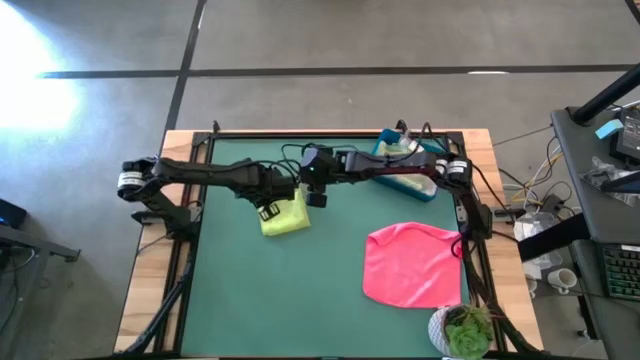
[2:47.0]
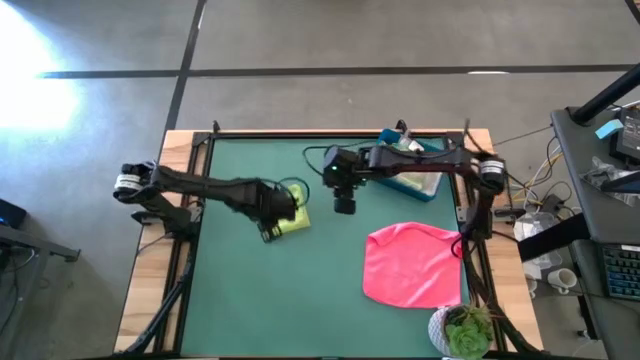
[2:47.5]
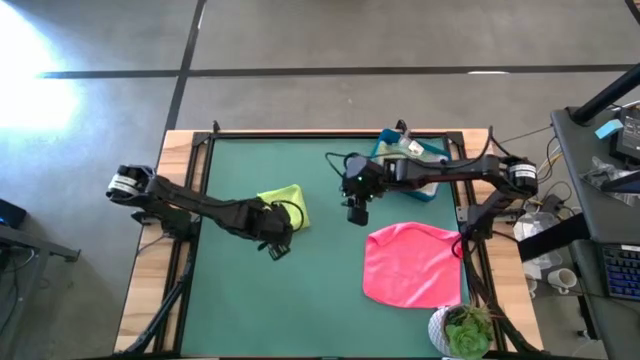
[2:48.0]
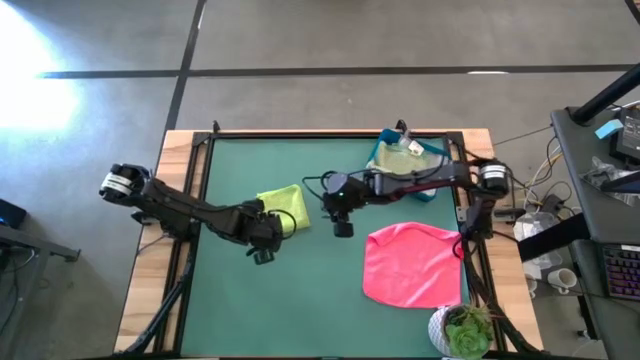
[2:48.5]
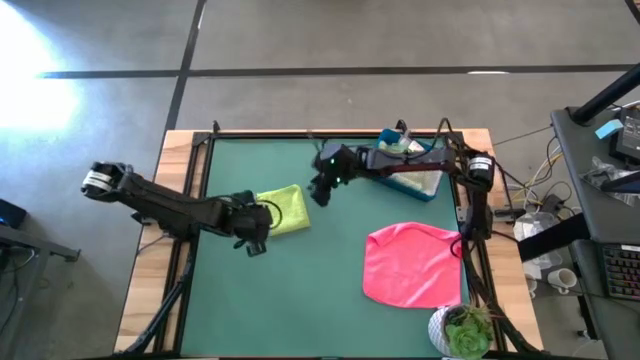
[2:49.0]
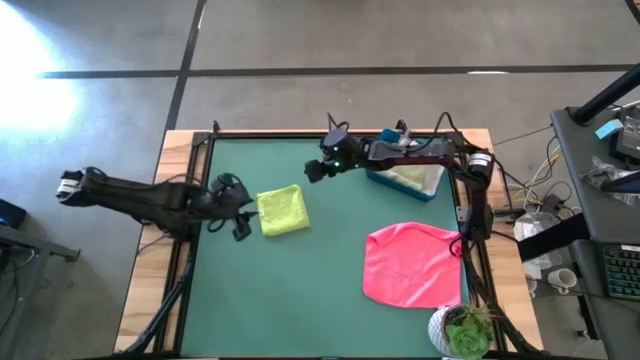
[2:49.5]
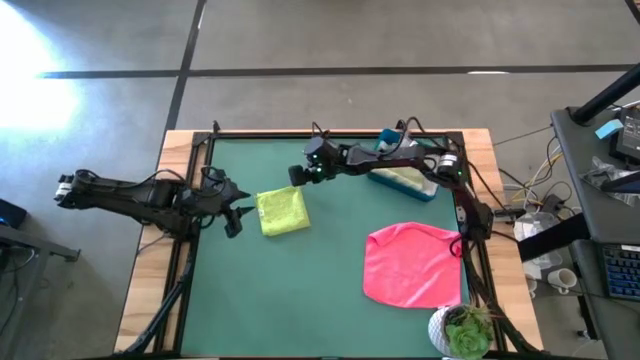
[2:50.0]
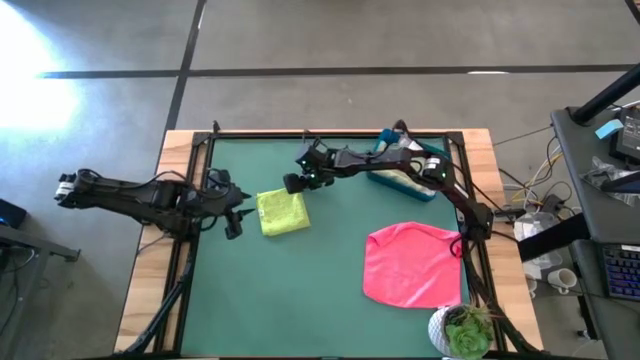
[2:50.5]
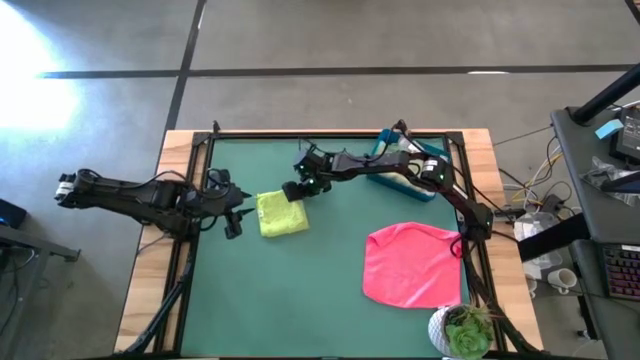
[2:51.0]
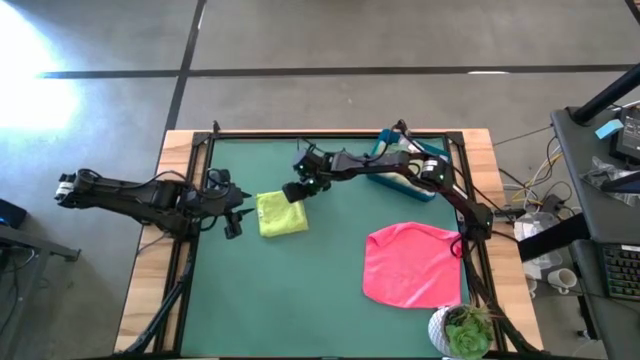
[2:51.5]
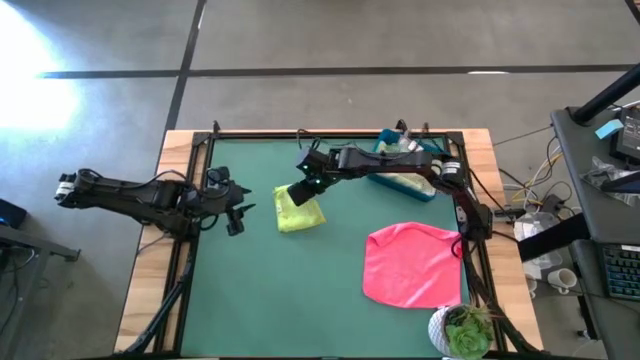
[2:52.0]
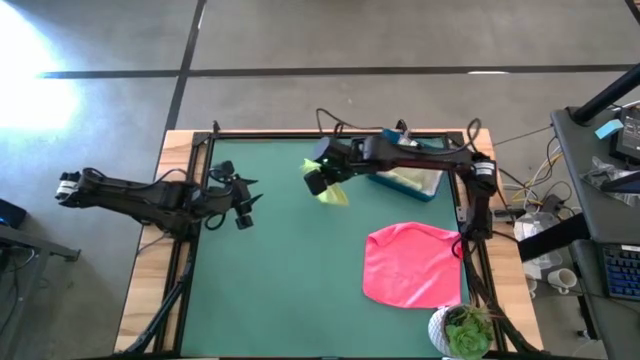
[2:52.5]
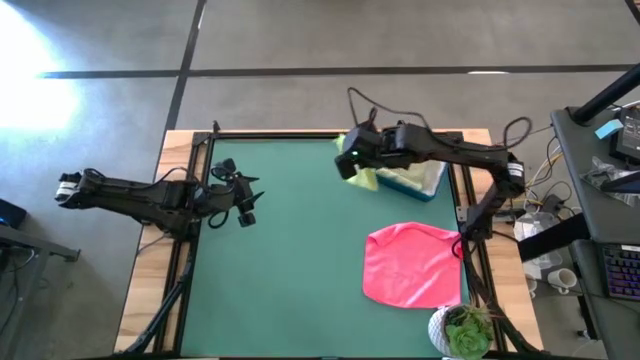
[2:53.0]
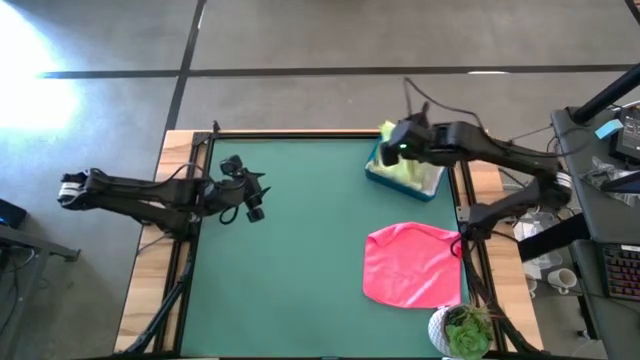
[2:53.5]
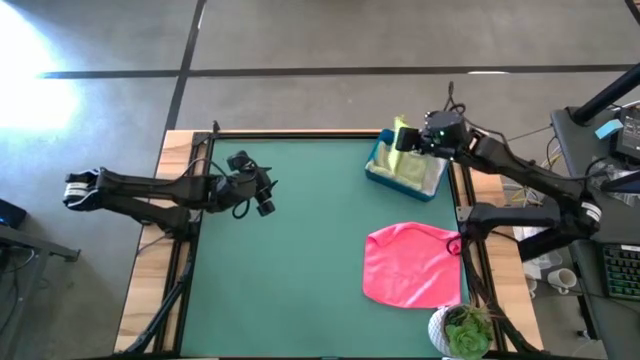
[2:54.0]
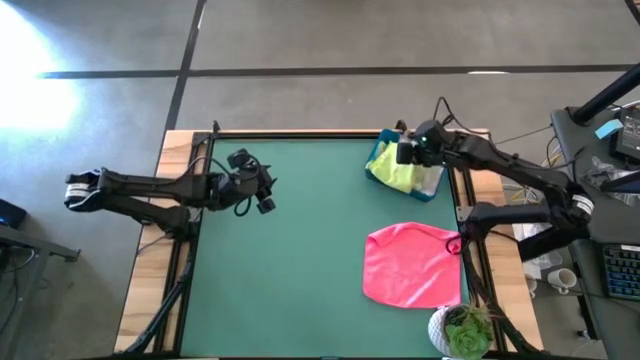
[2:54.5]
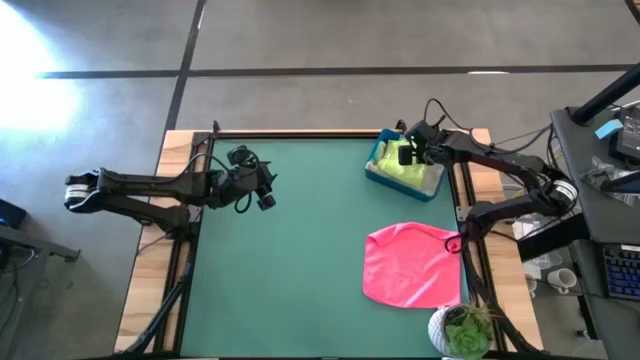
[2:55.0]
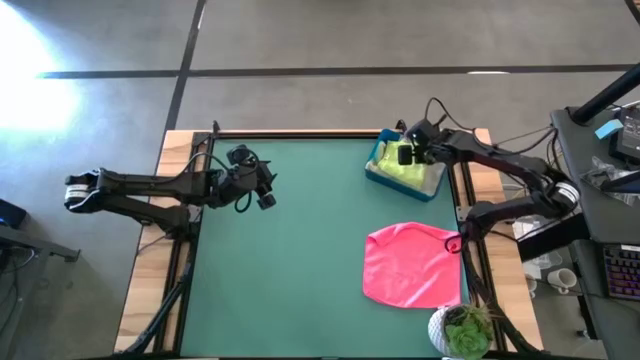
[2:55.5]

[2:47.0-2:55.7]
Task: Fold microfiber towels
Put the folded green microfiber cloth into the blue bin

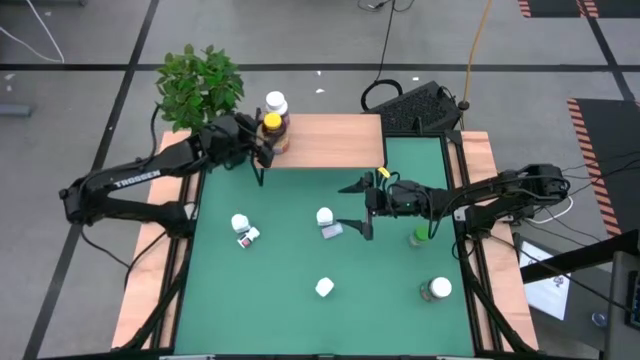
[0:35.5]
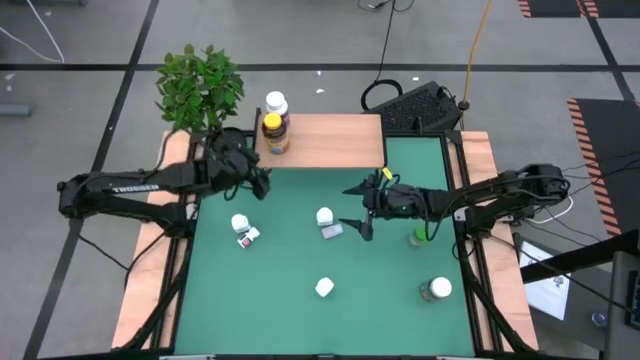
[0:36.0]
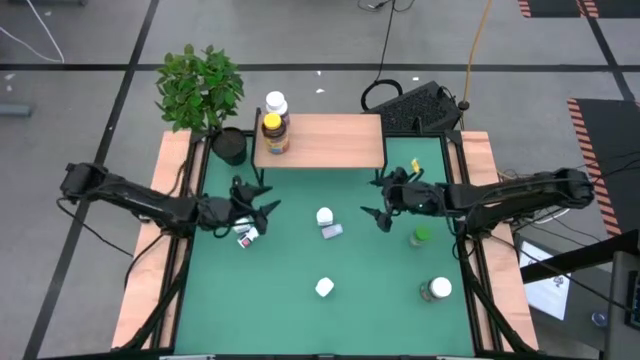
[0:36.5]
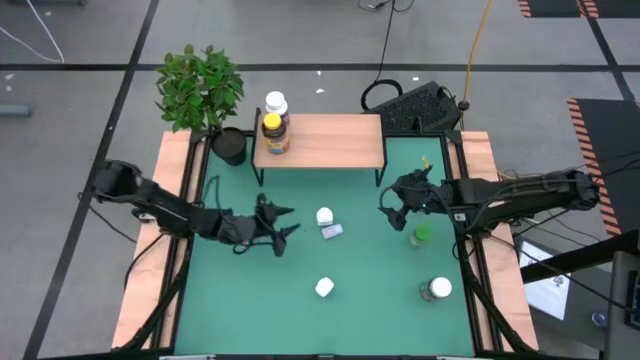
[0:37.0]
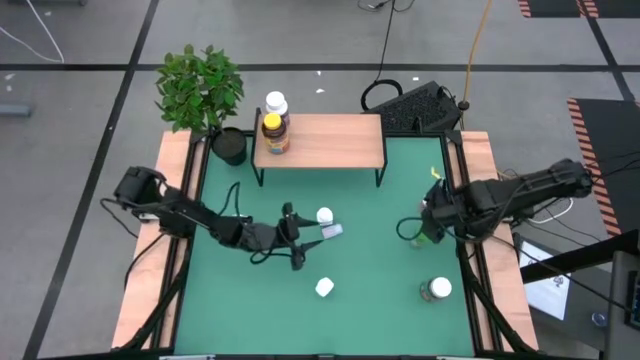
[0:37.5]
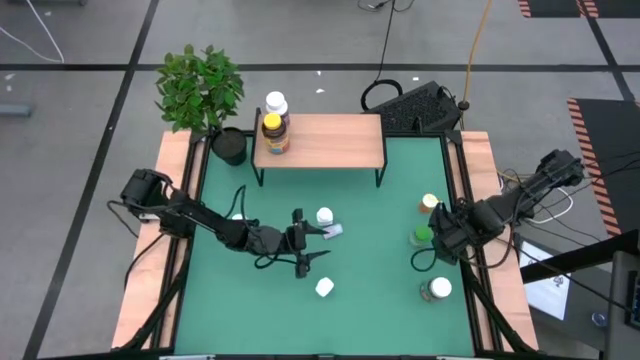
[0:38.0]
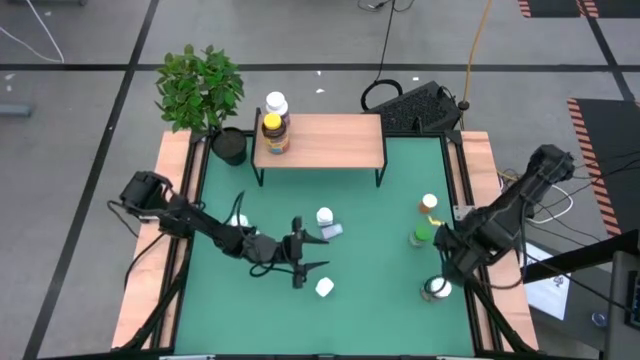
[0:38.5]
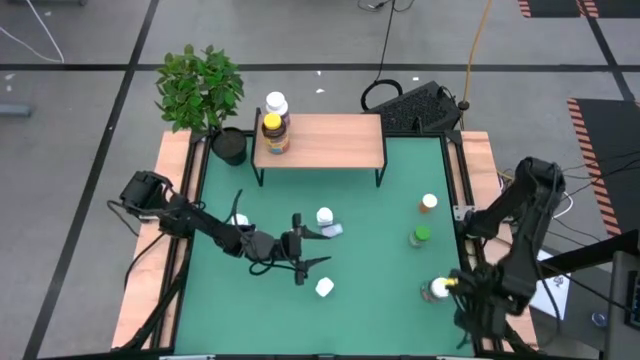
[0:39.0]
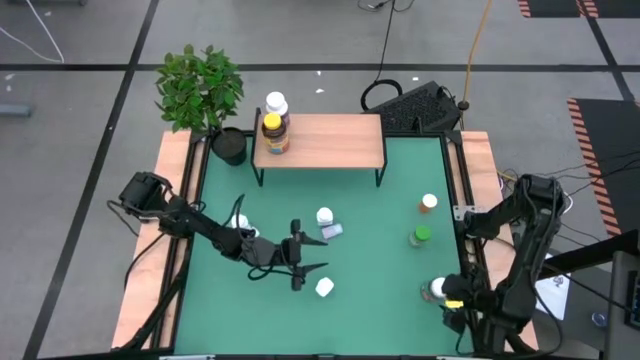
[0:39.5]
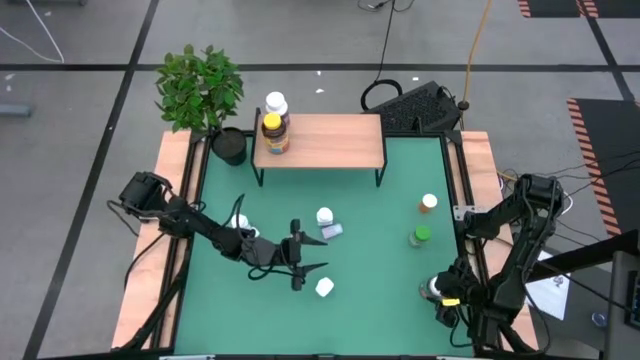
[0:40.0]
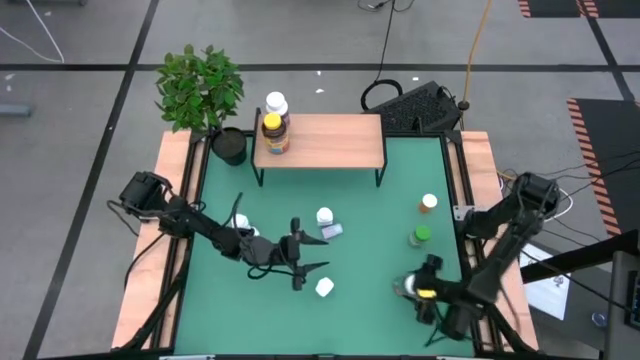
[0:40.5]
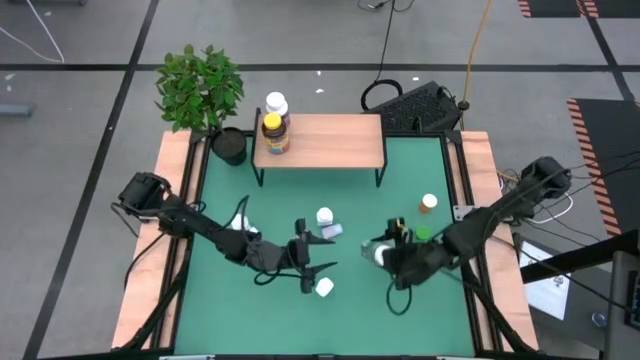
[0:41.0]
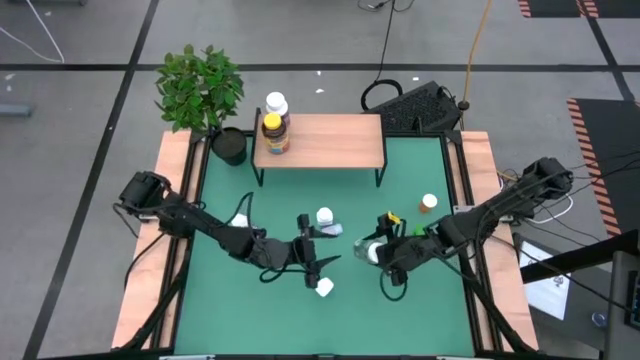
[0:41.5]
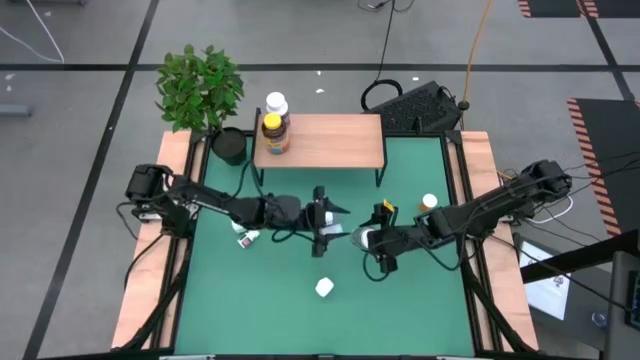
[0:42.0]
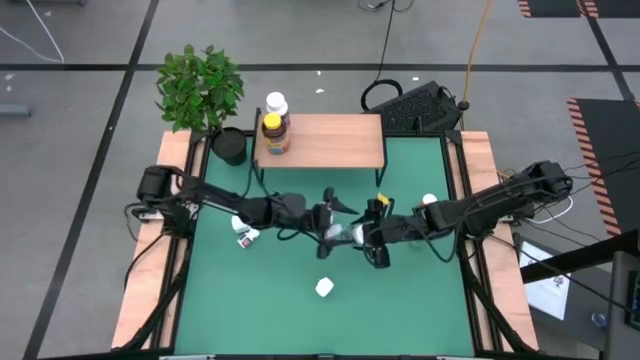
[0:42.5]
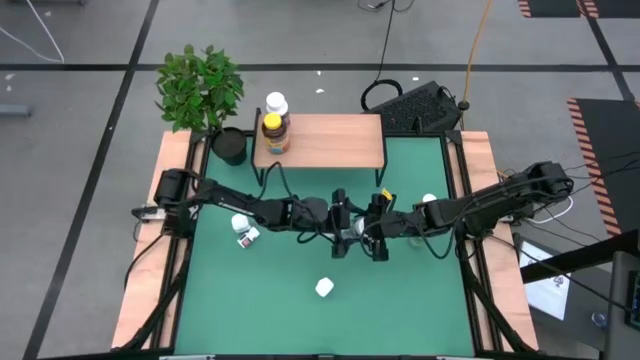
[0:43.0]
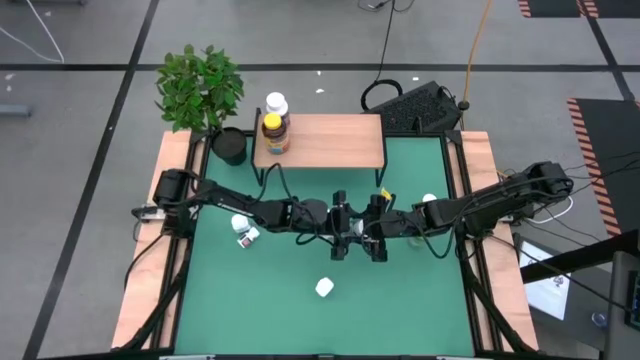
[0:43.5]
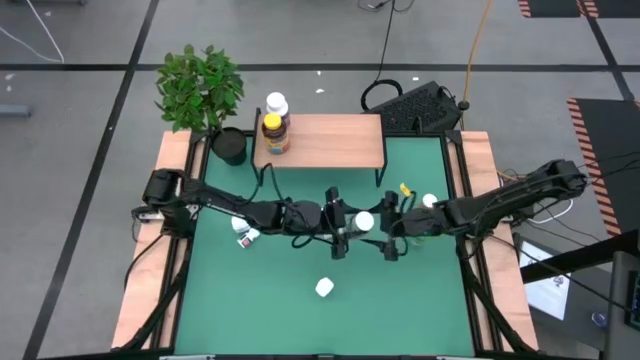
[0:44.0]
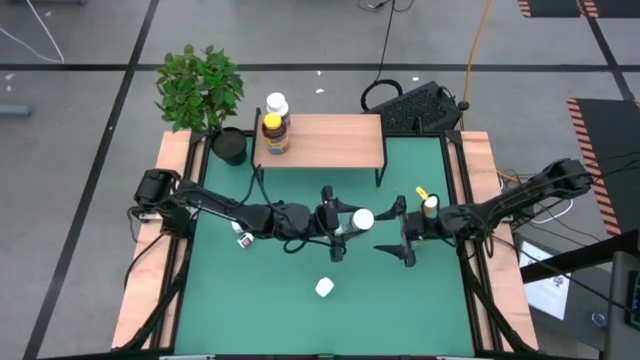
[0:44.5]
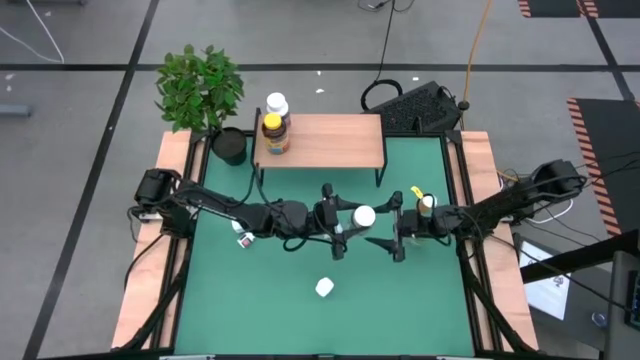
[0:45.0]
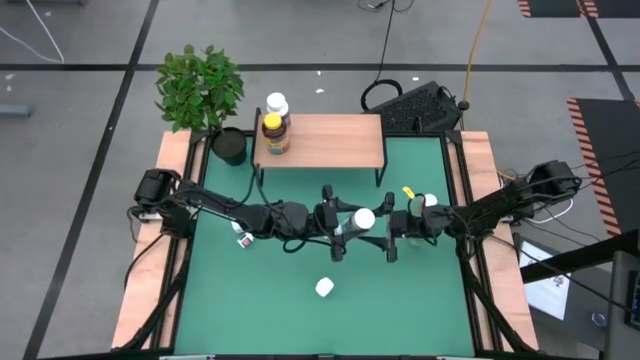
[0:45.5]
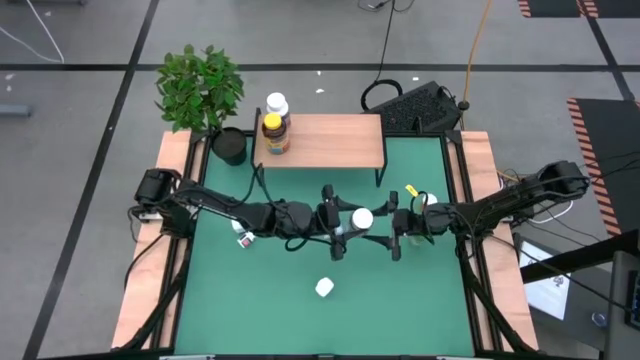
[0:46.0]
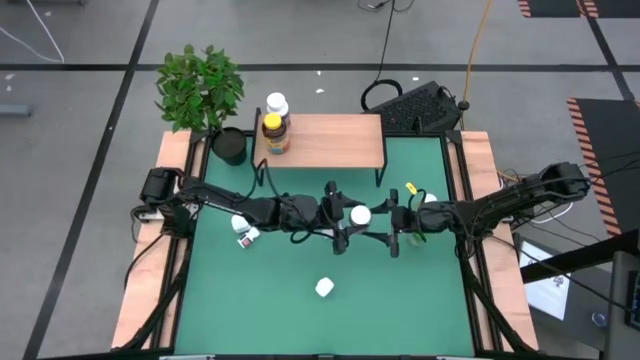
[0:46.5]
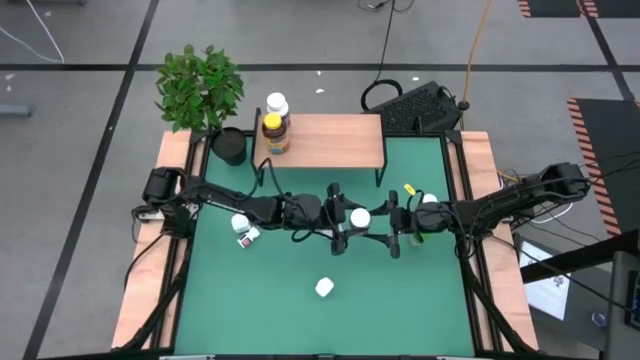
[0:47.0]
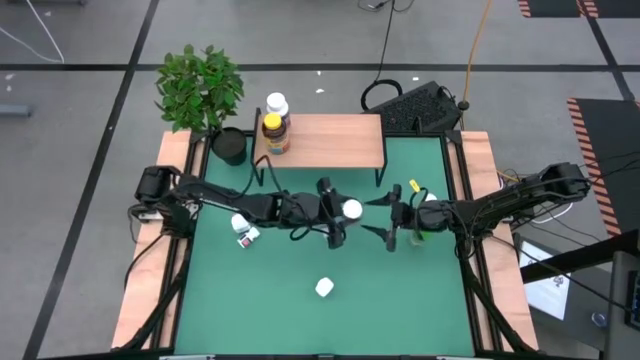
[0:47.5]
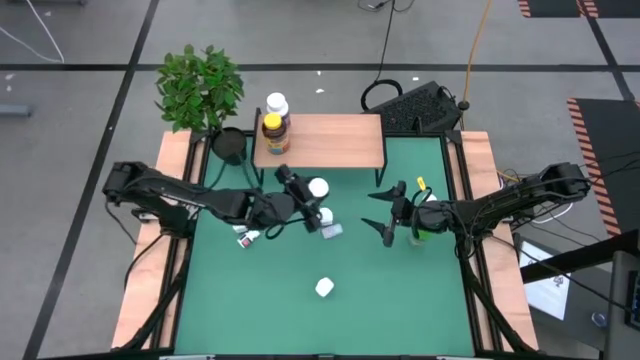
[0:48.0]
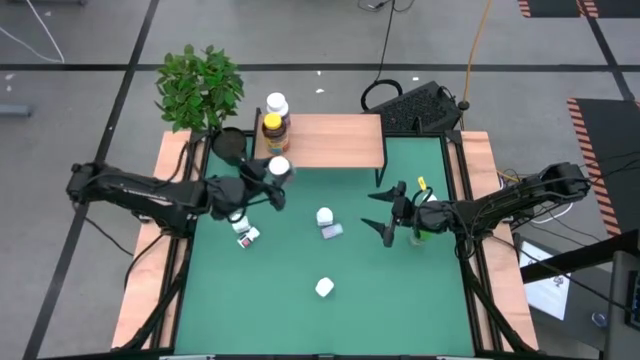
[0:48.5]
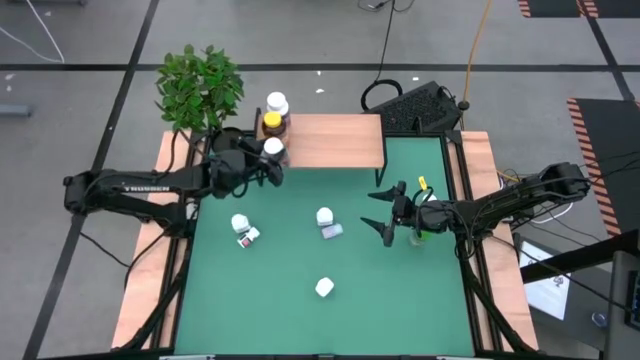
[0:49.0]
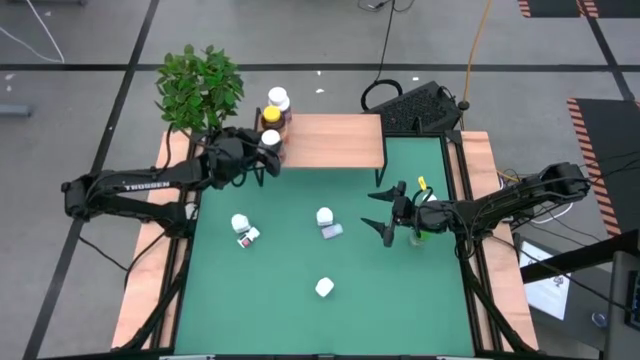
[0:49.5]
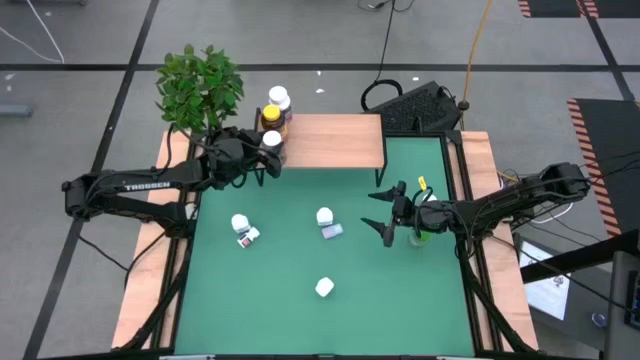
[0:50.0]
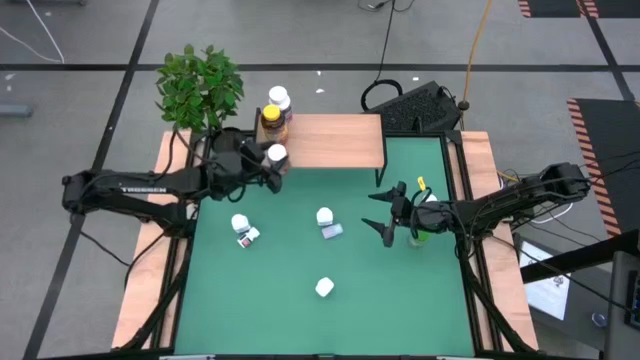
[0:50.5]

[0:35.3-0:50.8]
Task: Pick and place medicine bottles onto shelf by color
Put the large green pill bottle pill on the shelf
